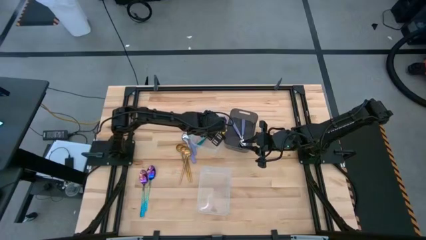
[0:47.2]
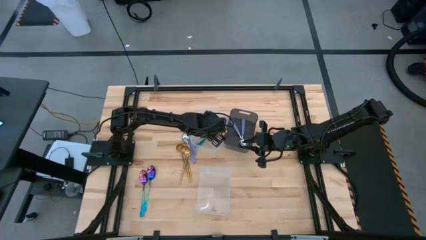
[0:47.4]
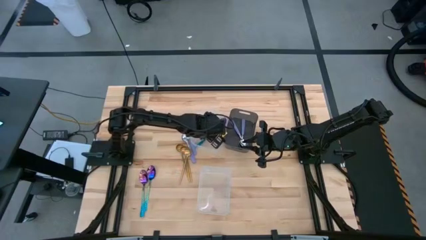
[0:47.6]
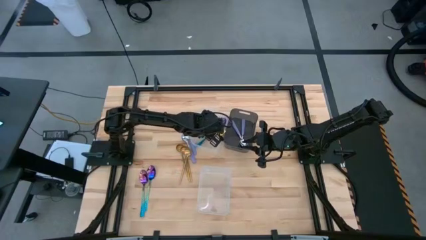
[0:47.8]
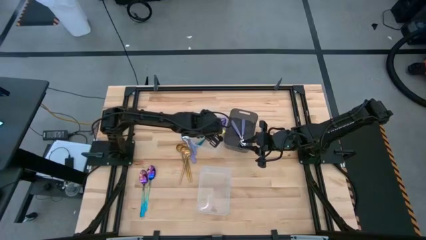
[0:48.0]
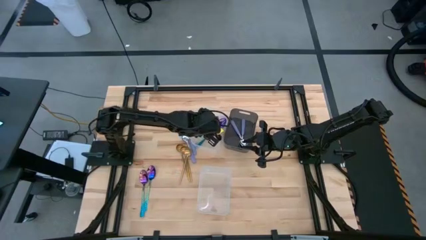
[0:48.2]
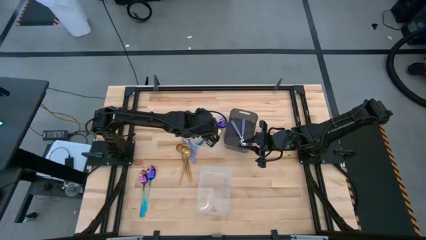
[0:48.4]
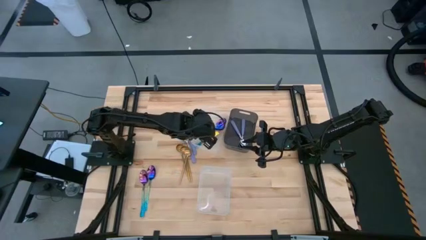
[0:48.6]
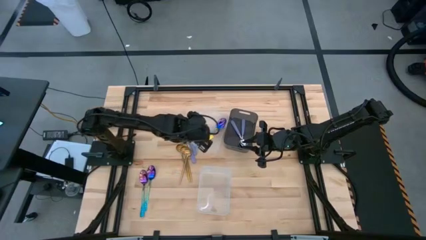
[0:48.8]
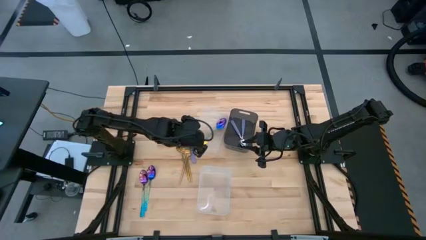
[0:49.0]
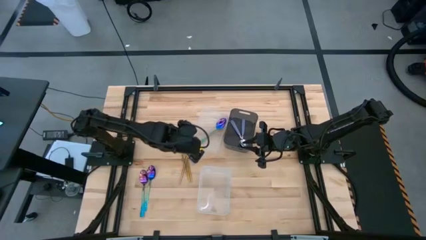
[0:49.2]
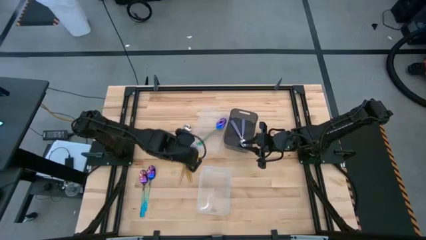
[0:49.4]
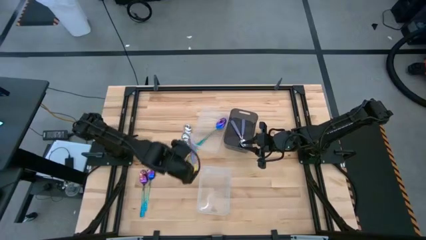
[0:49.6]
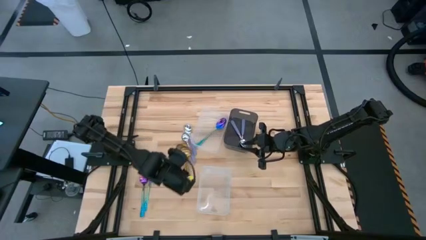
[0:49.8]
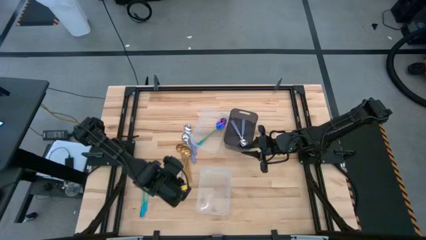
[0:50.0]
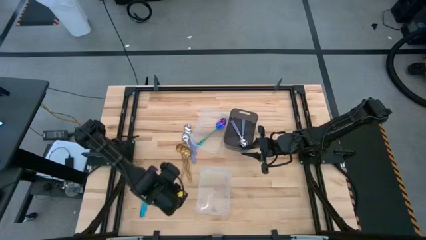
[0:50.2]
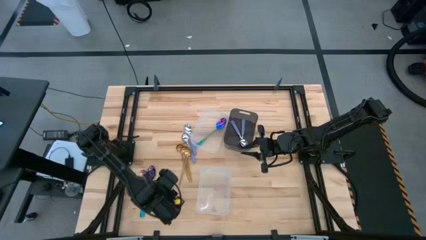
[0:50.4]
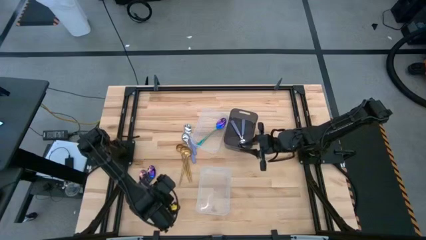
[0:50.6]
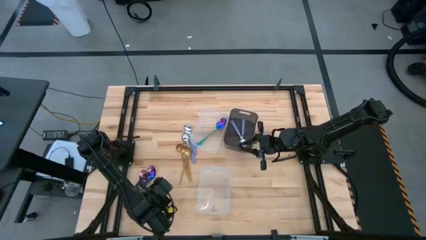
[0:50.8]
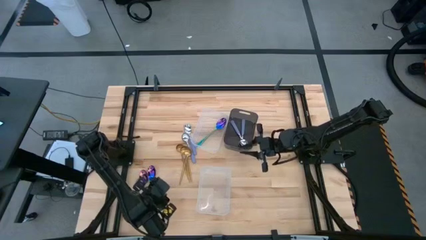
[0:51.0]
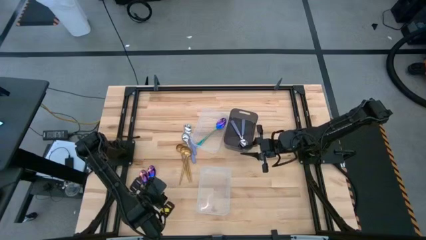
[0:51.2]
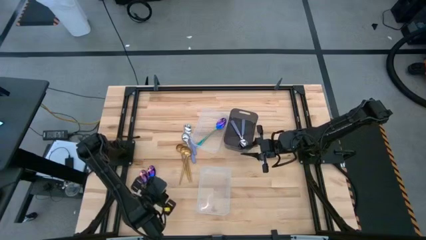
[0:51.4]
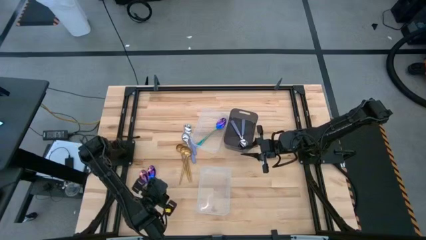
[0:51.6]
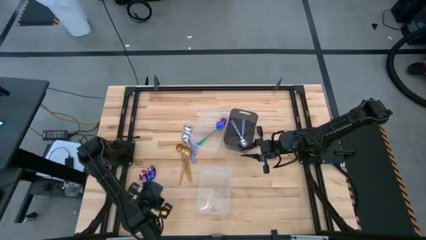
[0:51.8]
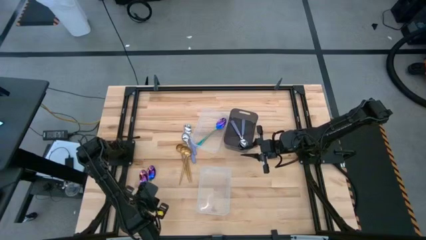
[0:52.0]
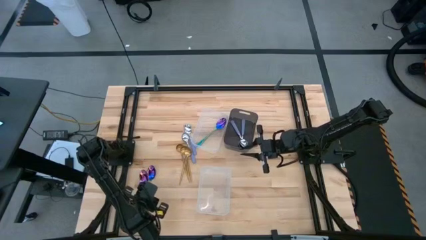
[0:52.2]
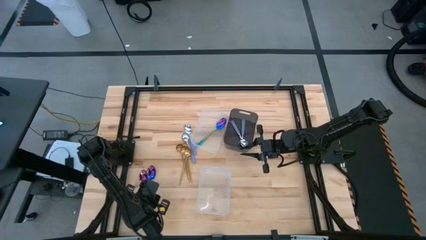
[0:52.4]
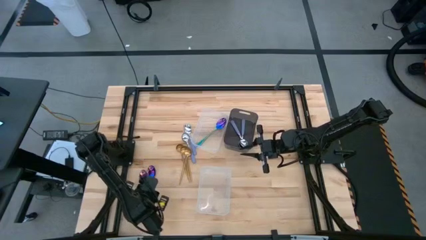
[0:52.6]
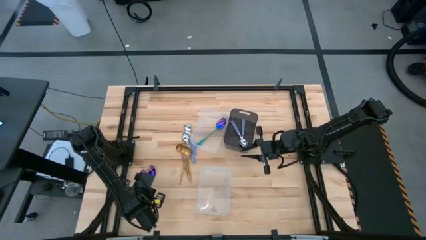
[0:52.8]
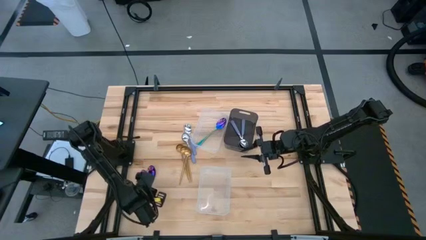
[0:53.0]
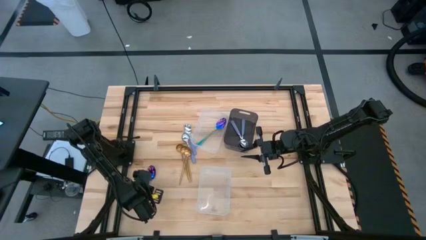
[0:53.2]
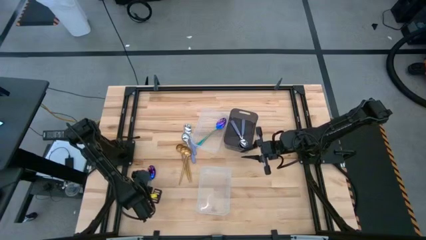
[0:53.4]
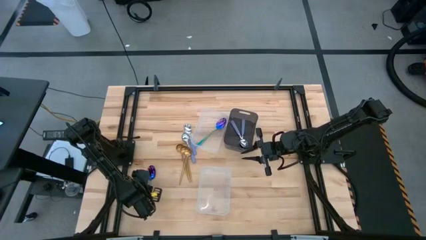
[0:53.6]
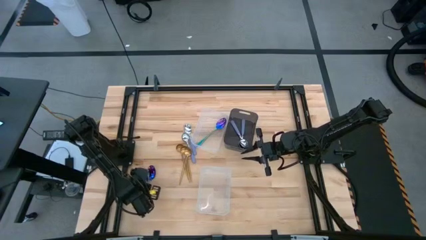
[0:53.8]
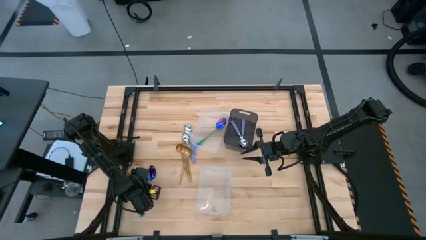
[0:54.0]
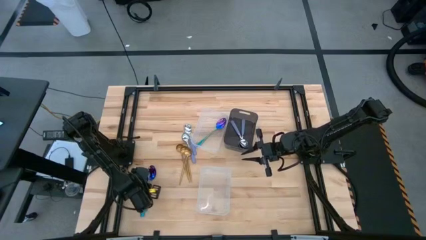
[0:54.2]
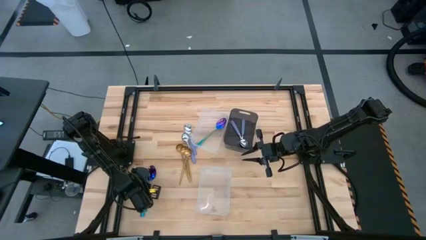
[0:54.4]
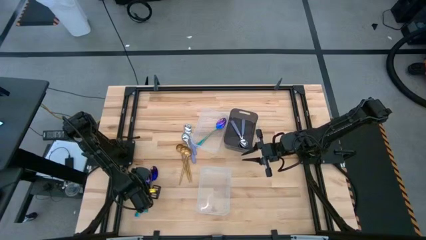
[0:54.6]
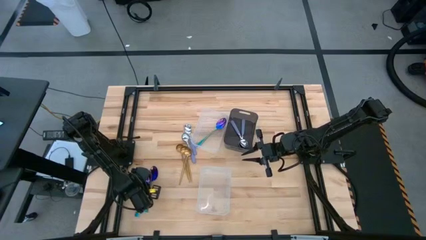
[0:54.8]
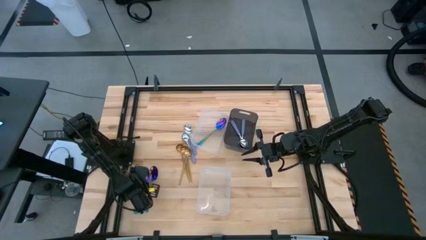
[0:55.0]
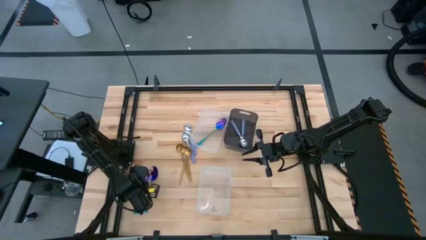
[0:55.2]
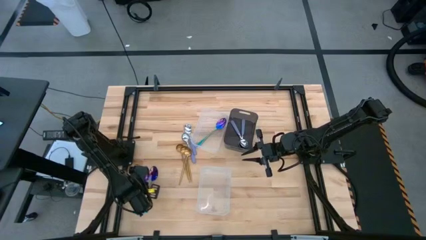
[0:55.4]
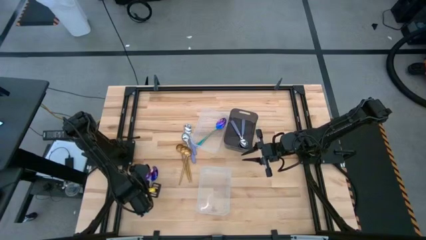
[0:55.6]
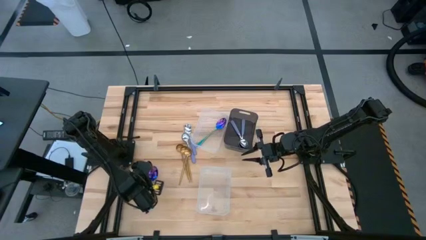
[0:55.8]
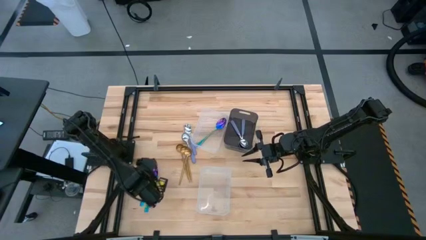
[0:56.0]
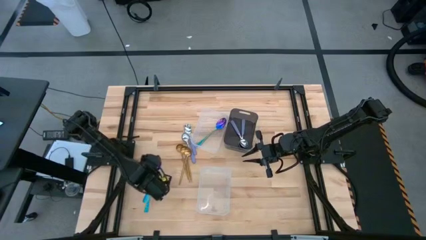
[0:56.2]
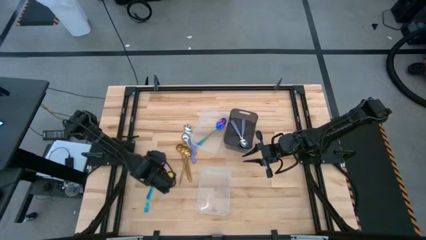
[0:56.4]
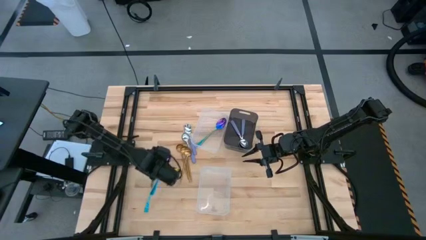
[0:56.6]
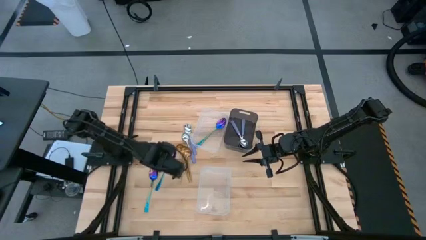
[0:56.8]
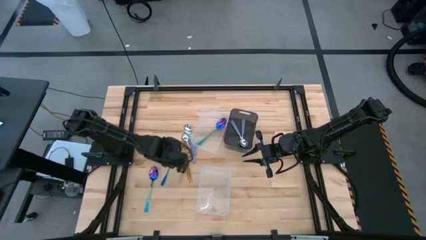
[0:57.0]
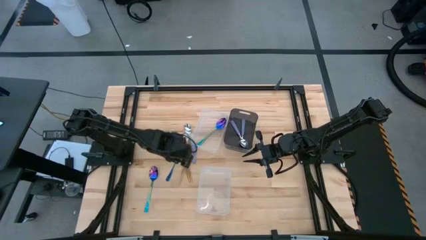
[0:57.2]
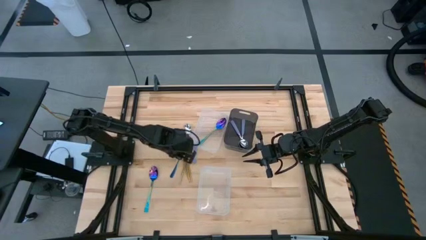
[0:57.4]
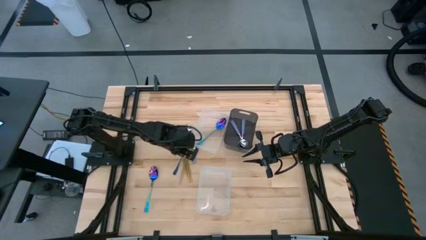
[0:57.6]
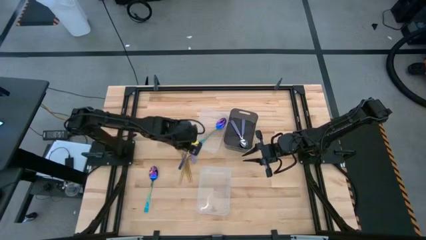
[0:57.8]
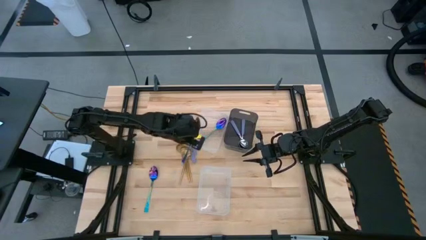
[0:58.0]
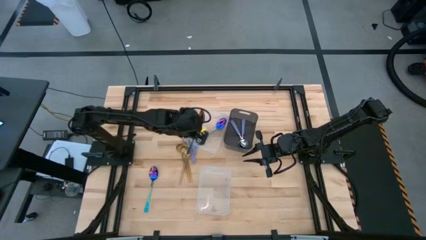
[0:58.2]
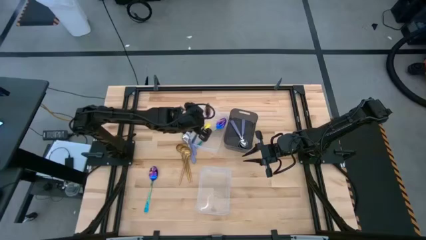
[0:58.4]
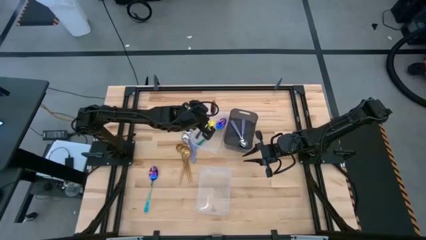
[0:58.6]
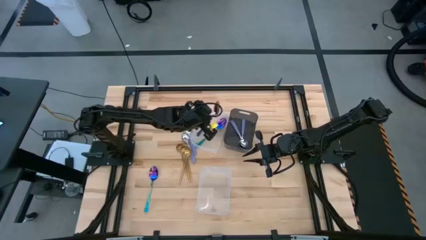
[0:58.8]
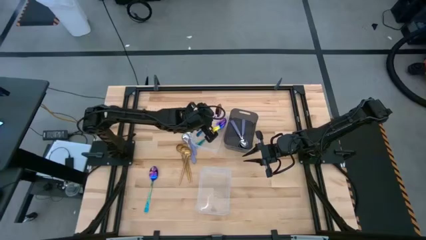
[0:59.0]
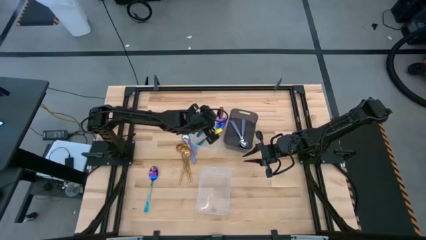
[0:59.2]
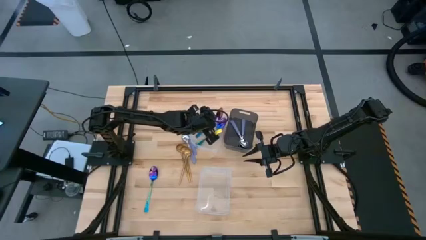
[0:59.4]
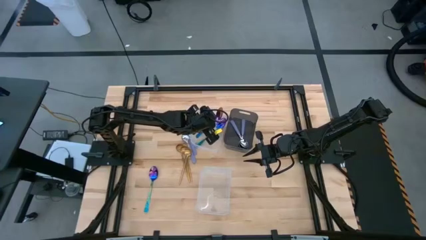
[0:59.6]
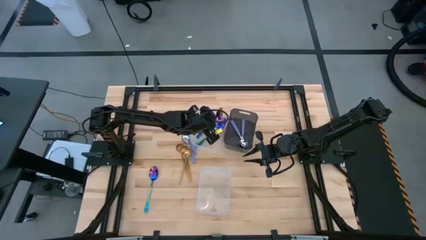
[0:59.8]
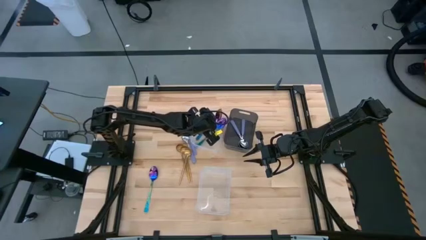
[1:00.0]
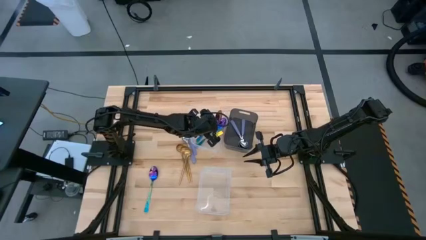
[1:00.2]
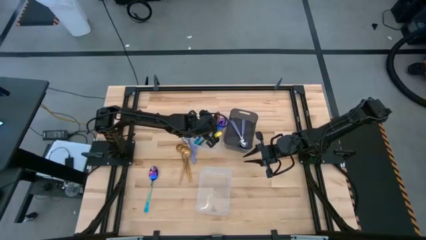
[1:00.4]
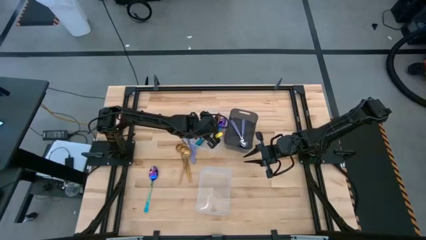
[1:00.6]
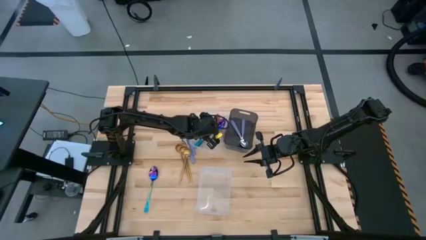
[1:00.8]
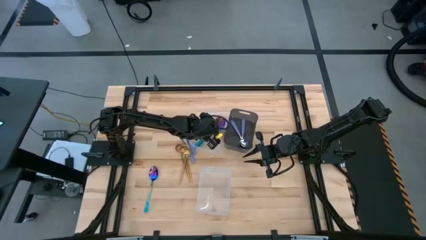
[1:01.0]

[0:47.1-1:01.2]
Task: Sort silverware by color (type)
Put the blue spoon into the top transparent bin
